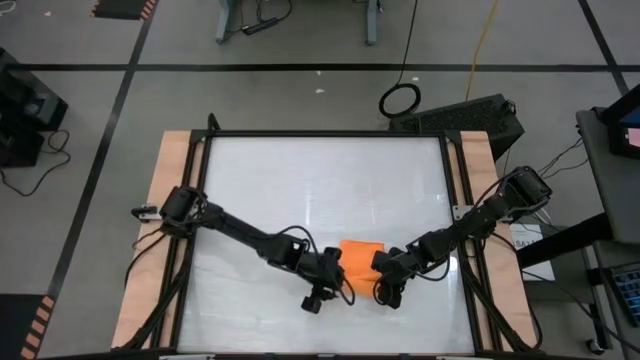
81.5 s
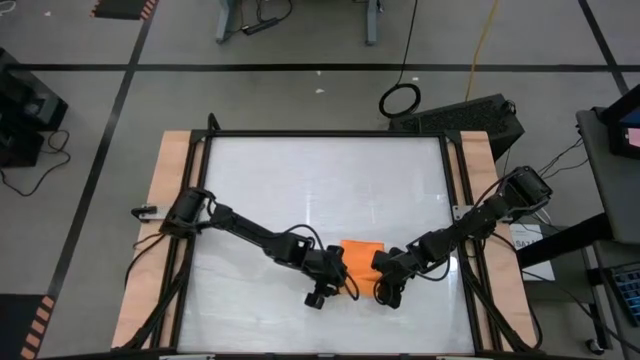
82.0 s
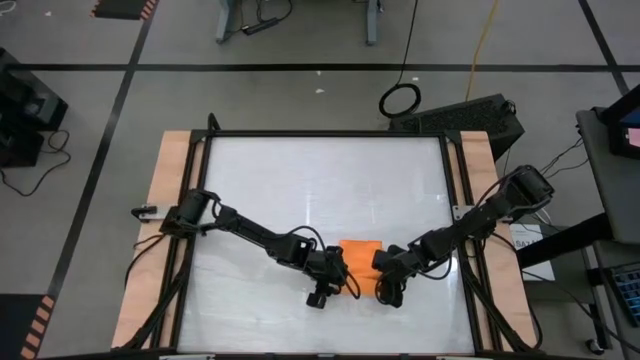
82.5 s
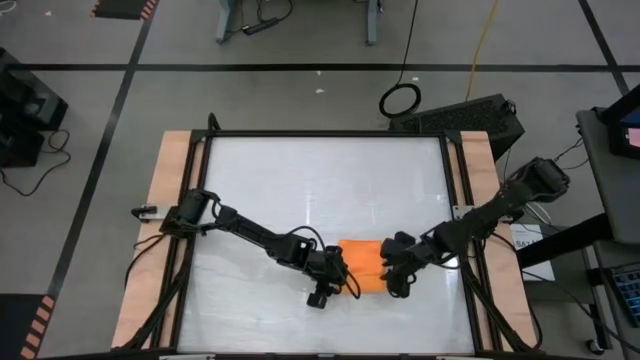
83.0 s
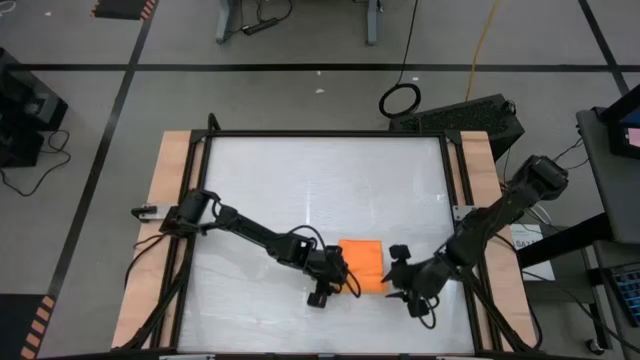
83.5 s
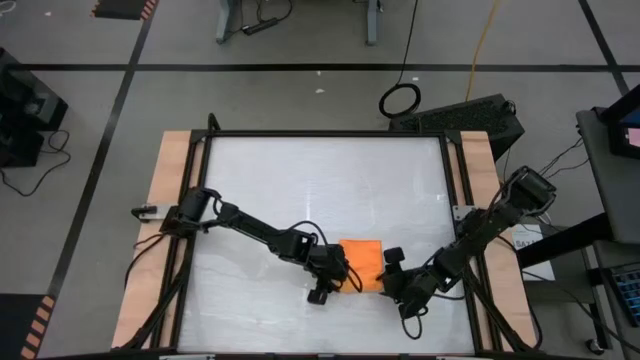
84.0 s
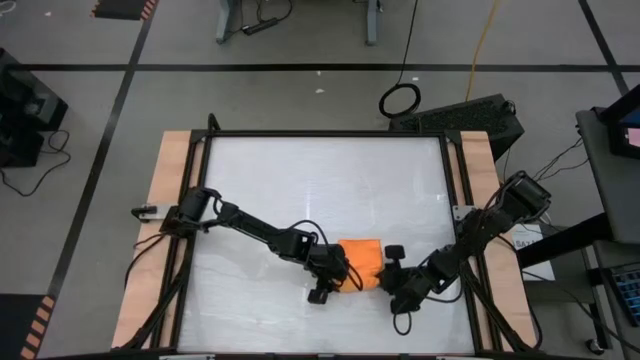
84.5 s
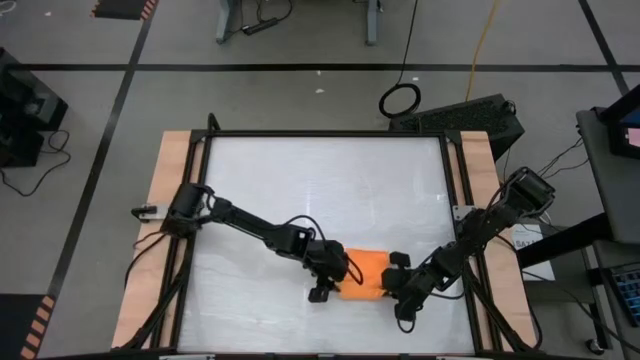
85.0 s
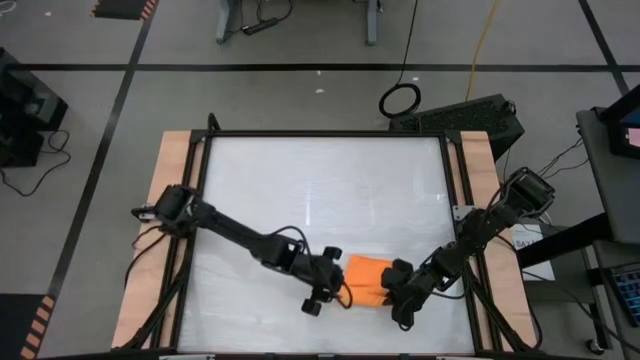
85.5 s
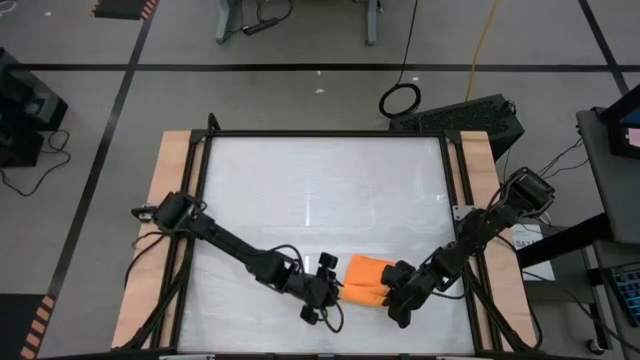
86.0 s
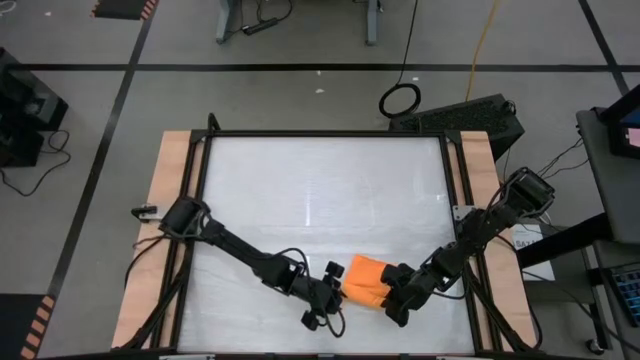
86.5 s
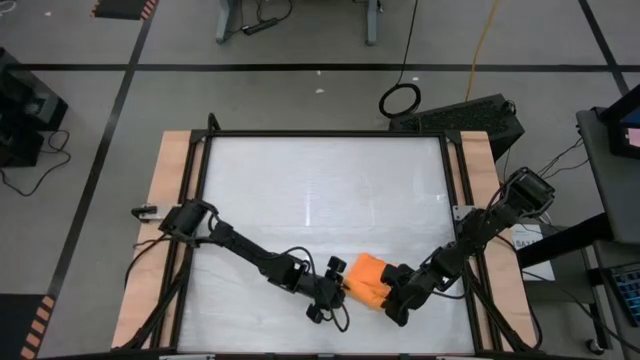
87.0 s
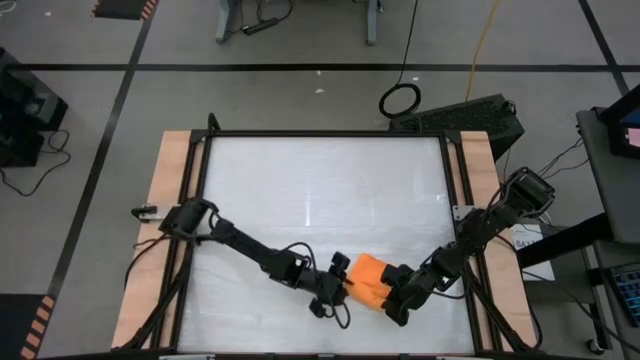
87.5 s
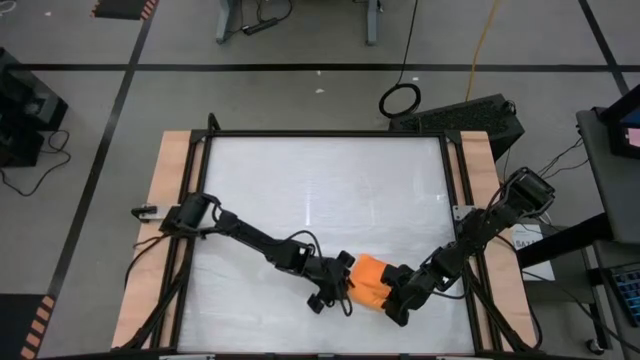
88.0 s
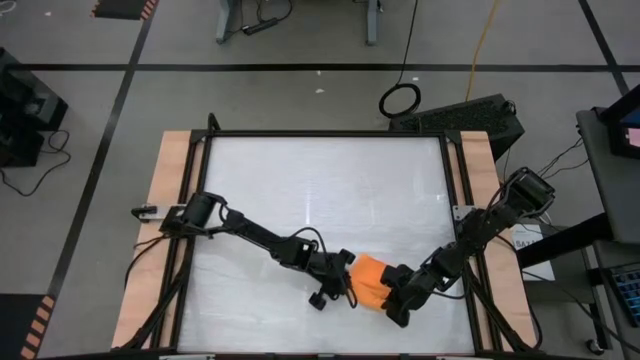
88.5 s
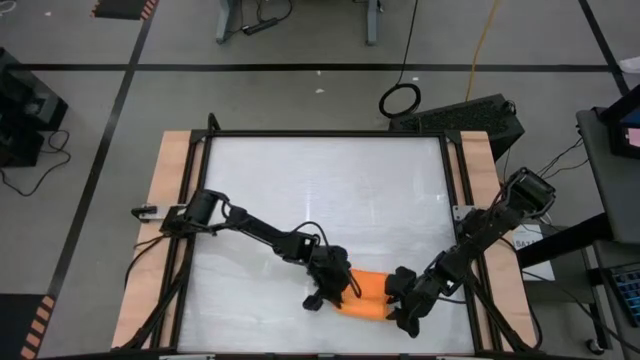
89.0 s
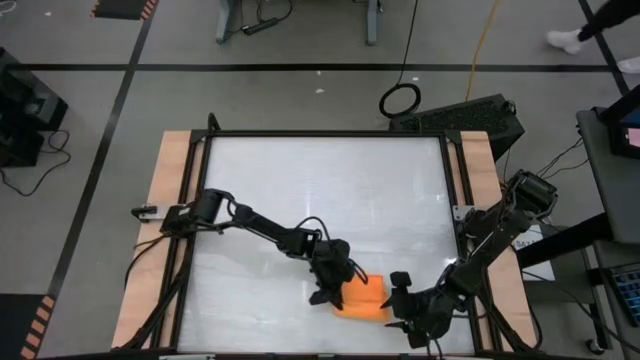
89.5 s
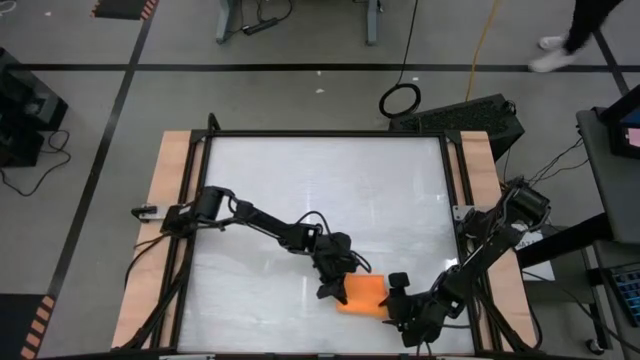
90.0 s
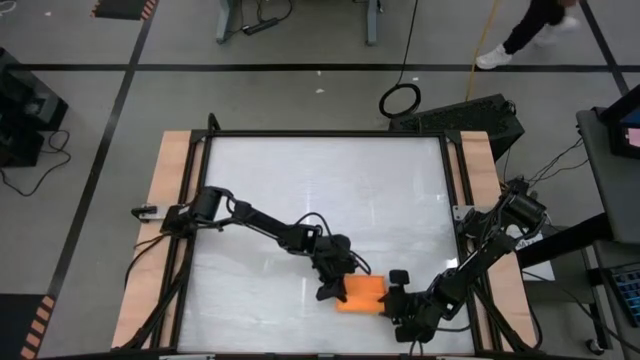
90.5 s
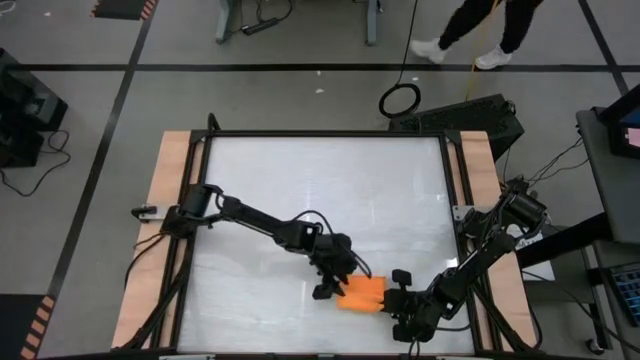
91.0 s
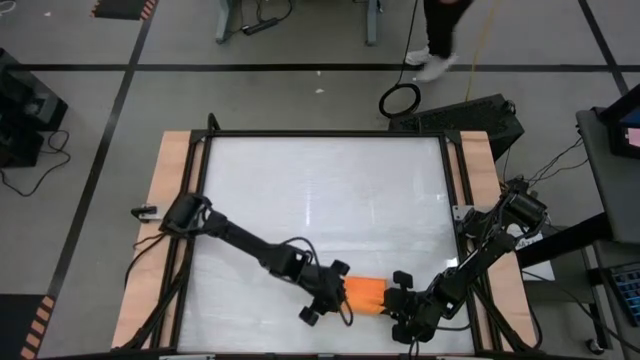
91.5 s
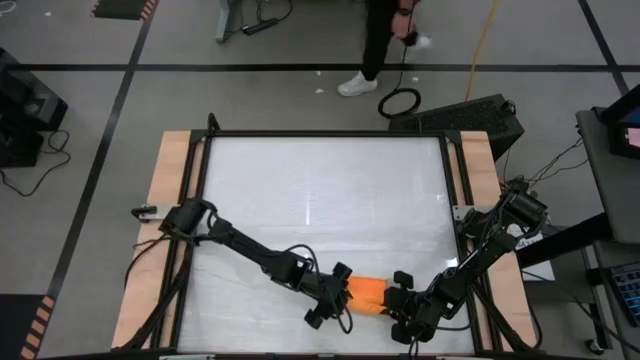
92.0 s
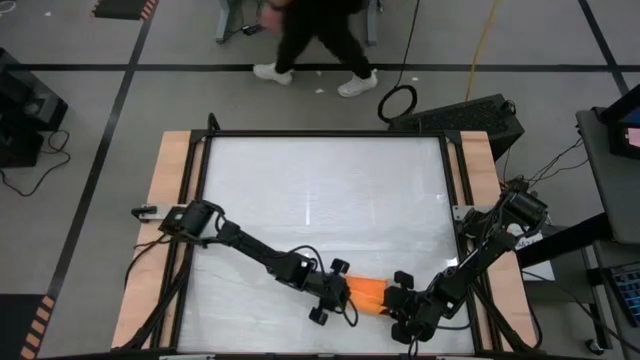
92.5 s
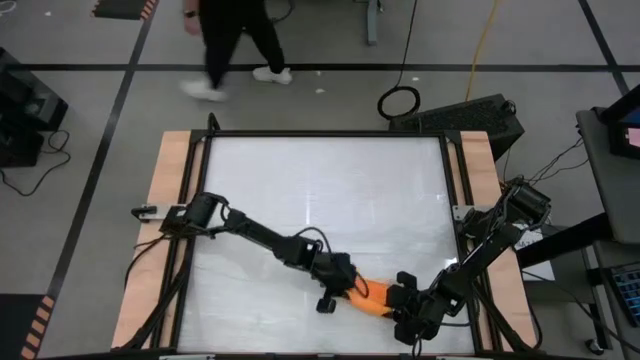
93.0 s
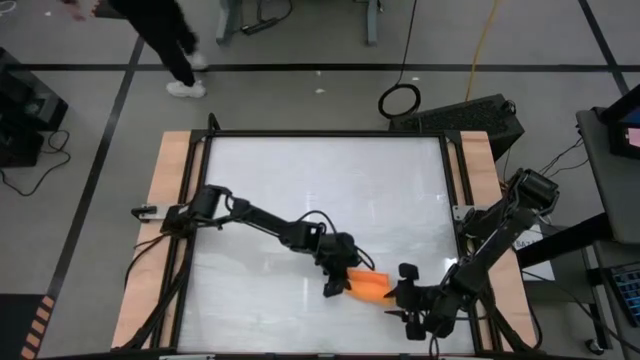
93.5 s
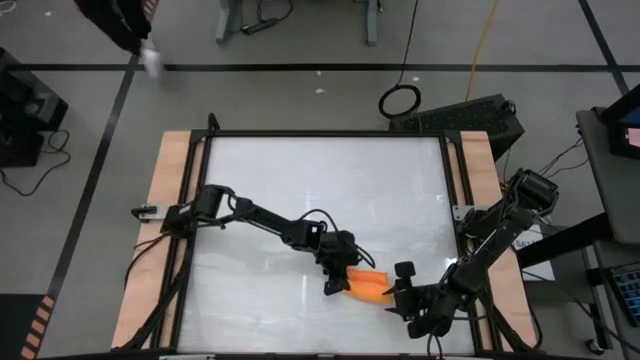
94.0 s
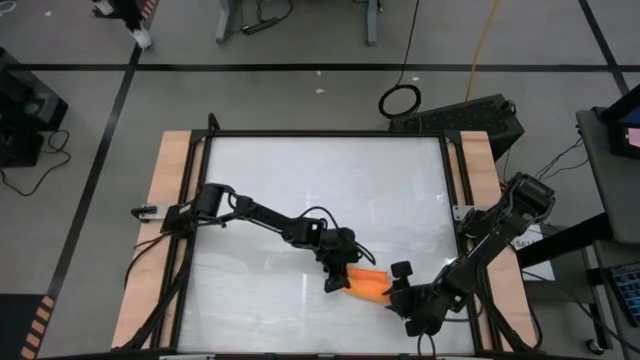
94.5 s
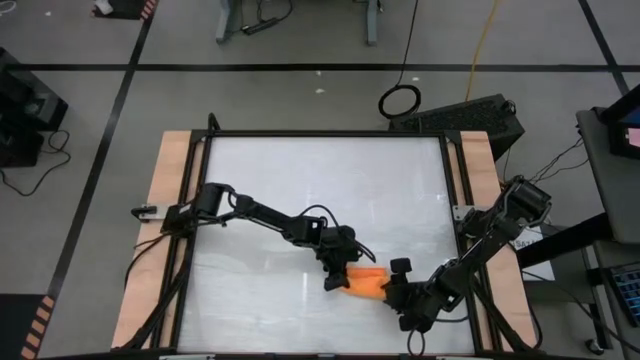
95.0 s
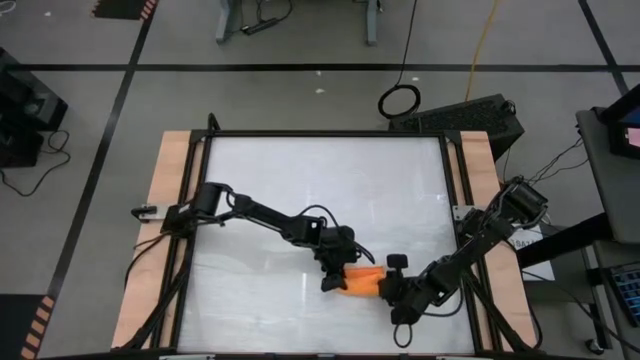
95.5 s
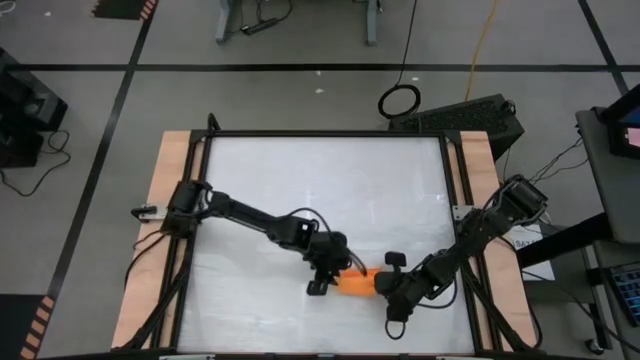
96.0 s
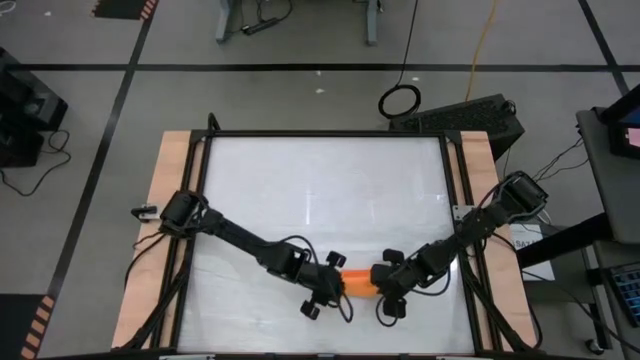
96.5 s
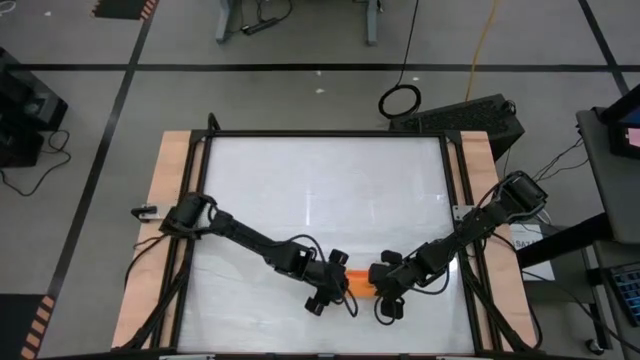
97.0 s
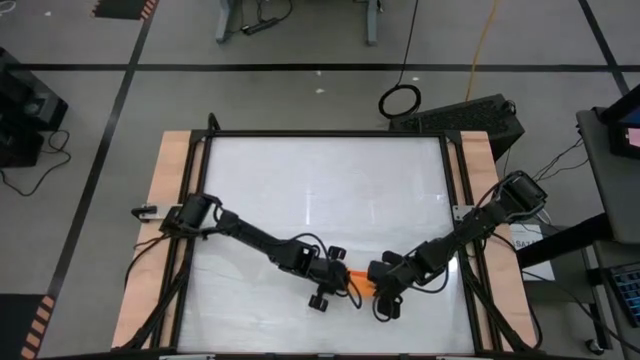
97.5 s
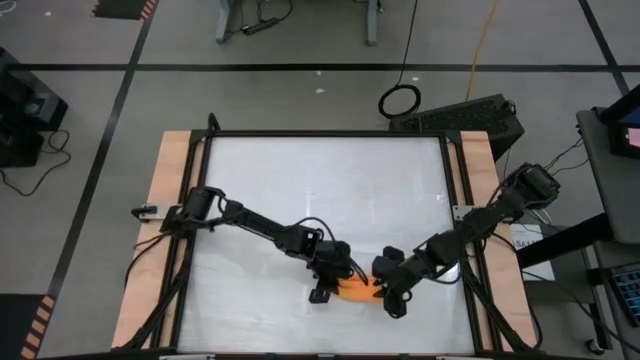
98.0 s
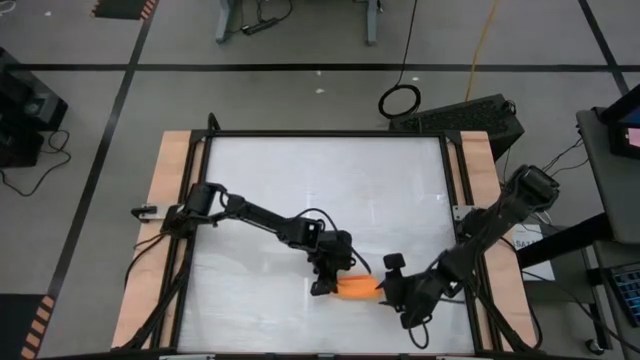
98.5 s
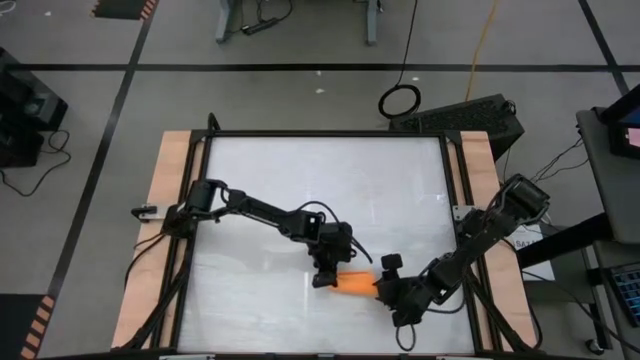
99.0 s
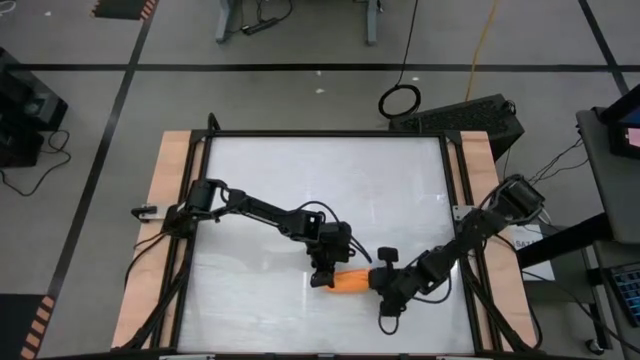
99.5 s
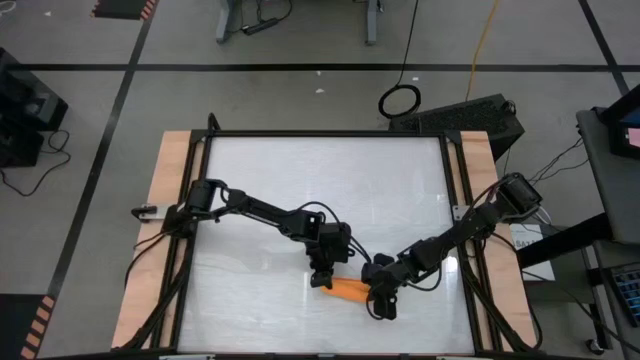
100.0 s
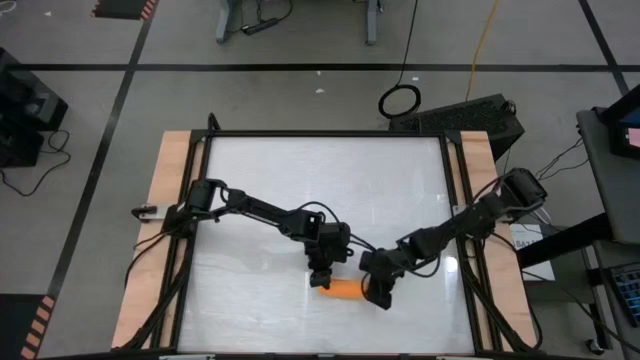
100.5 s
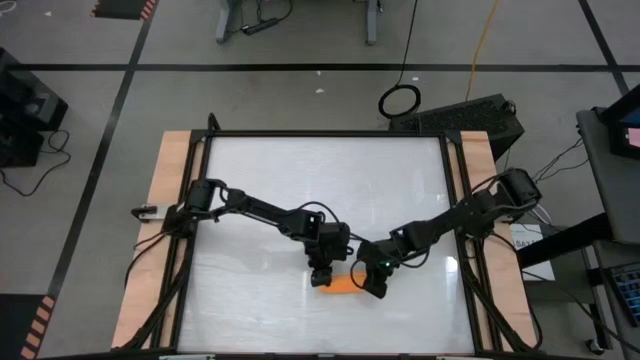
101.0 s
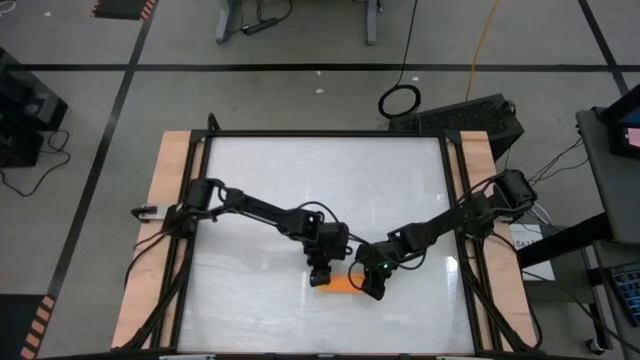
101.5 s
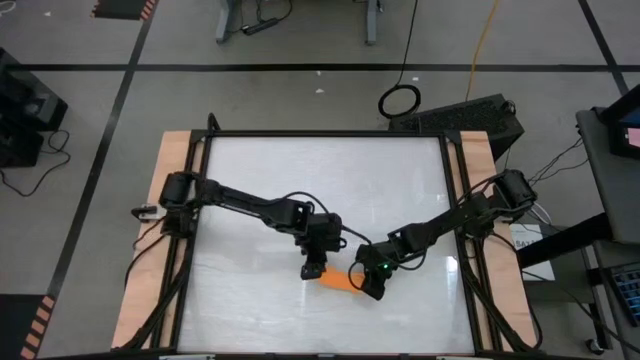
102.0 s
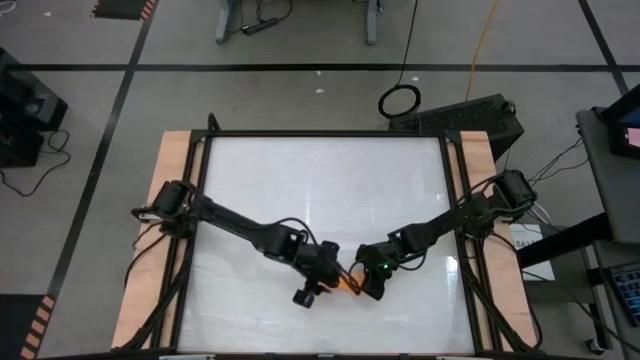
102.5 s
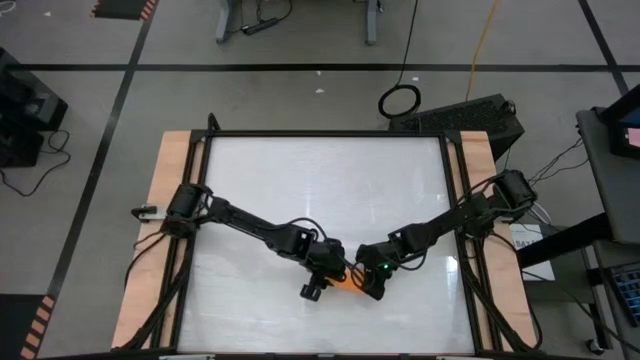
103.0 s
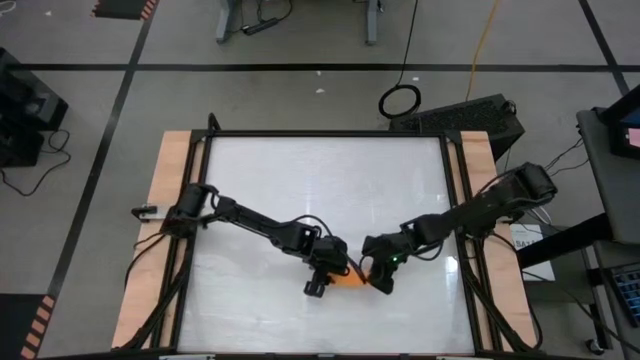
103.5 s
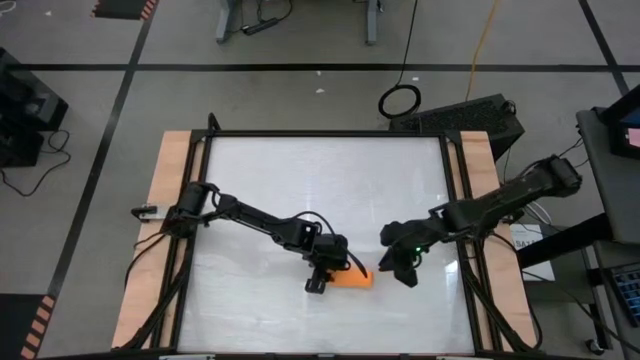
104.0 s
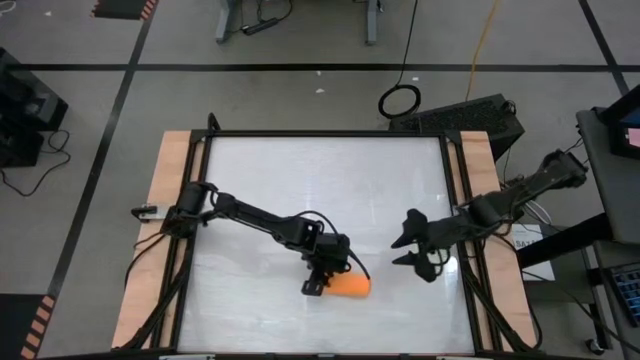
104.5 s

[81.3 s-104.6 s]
Task: Roll towel
Roll the orange microfiber cloth
